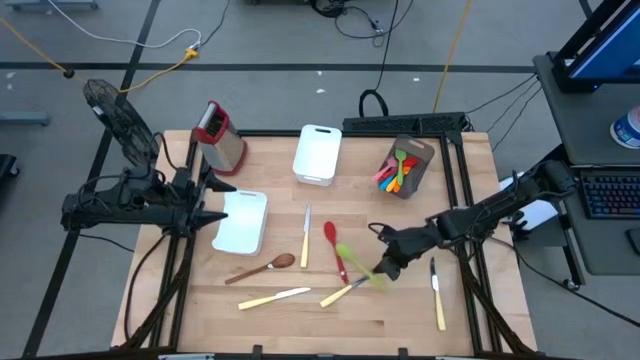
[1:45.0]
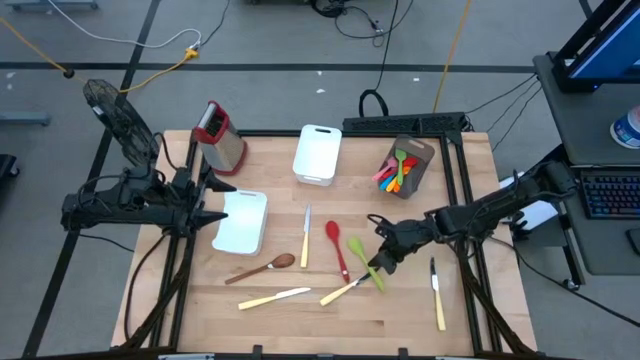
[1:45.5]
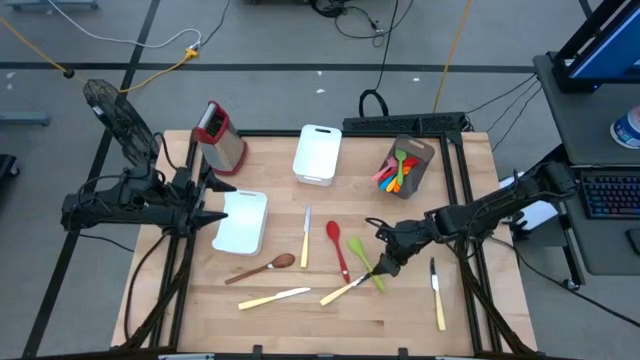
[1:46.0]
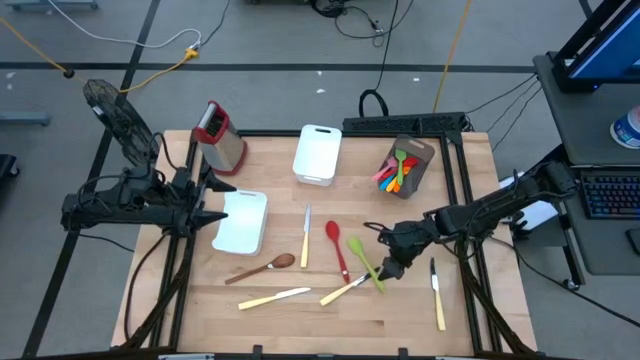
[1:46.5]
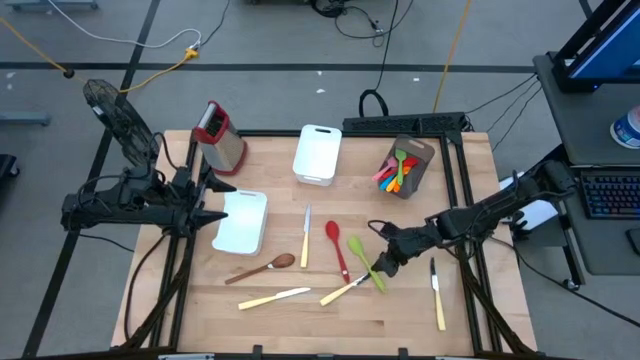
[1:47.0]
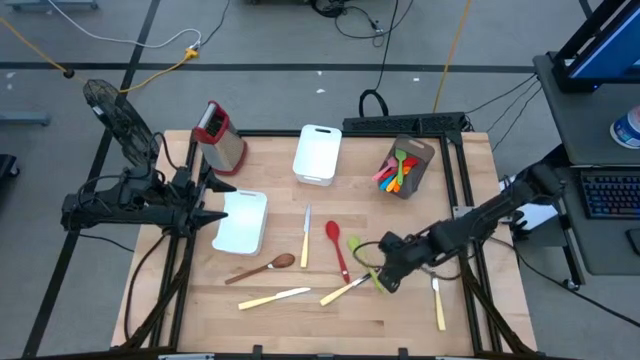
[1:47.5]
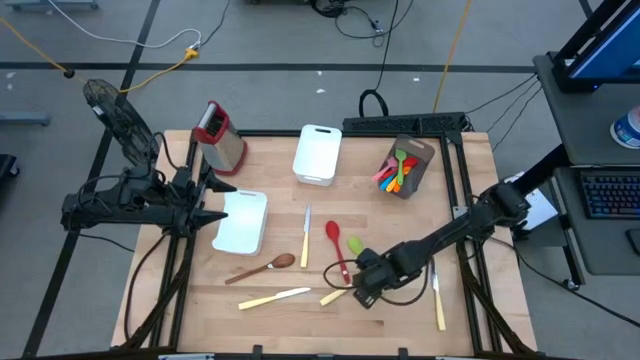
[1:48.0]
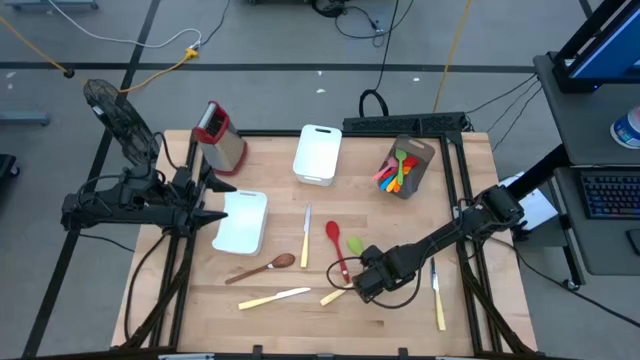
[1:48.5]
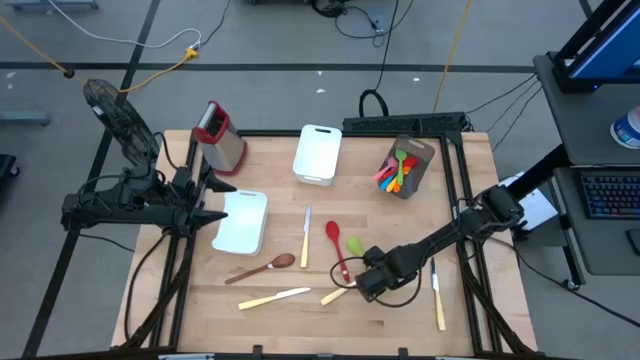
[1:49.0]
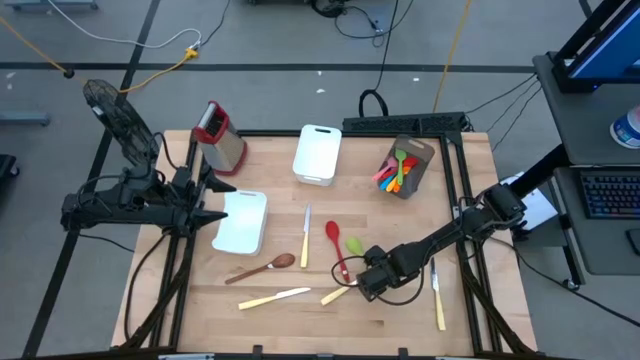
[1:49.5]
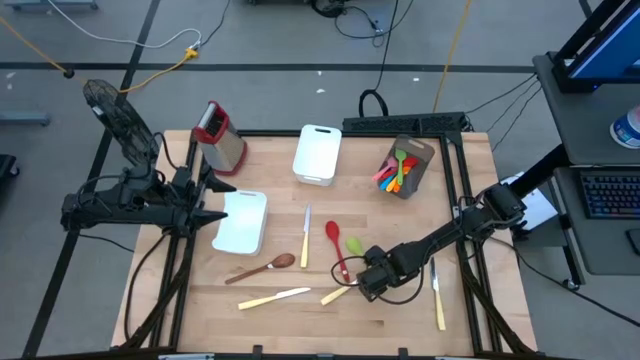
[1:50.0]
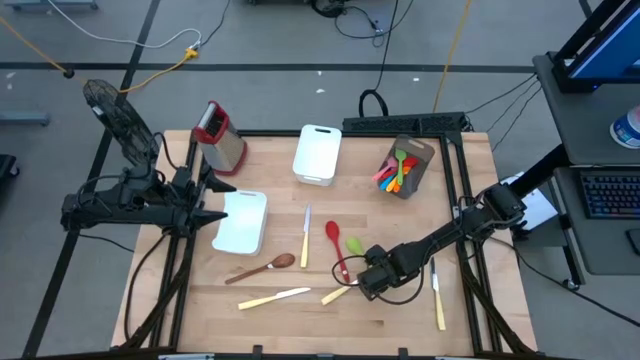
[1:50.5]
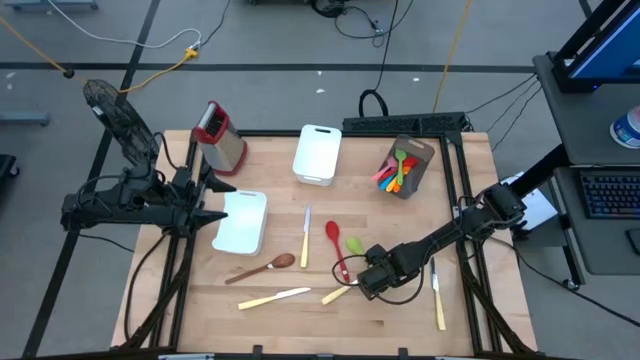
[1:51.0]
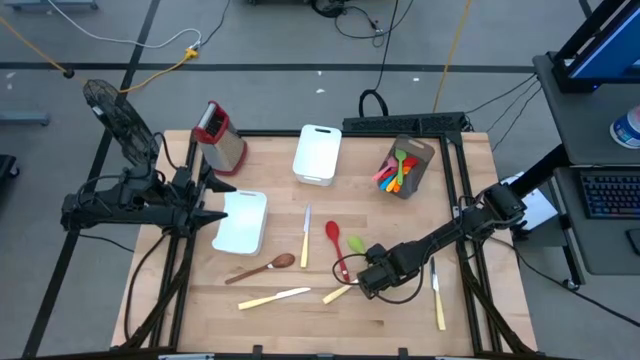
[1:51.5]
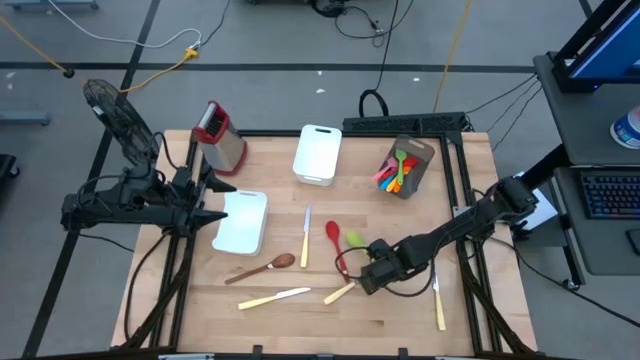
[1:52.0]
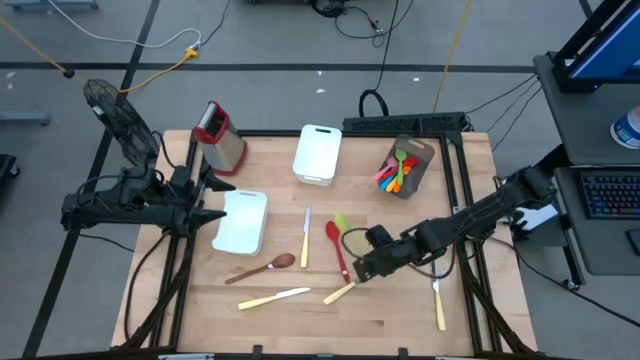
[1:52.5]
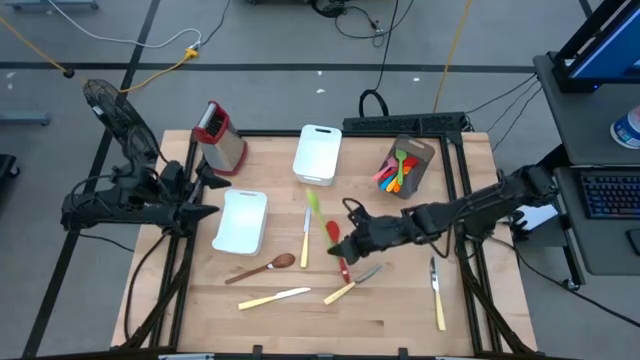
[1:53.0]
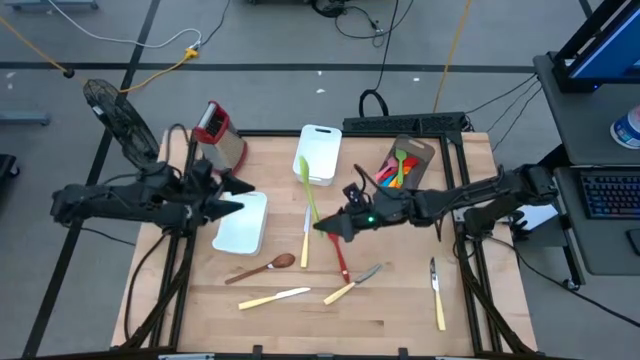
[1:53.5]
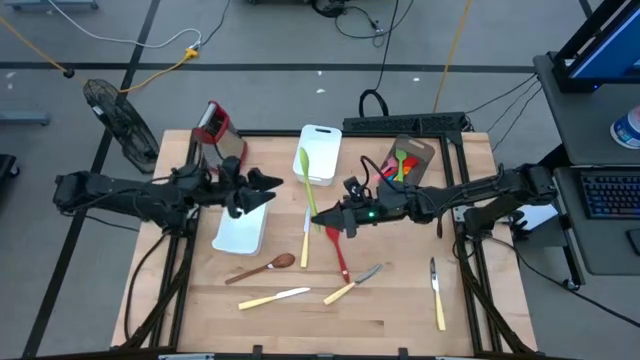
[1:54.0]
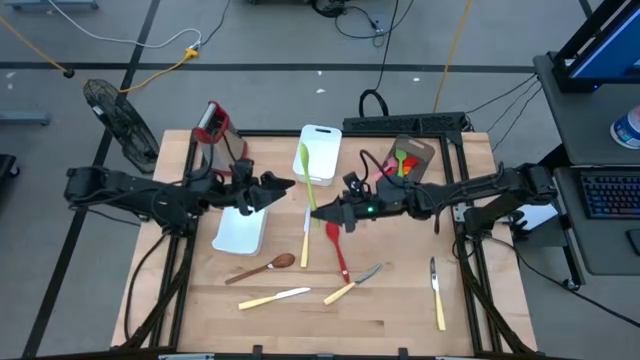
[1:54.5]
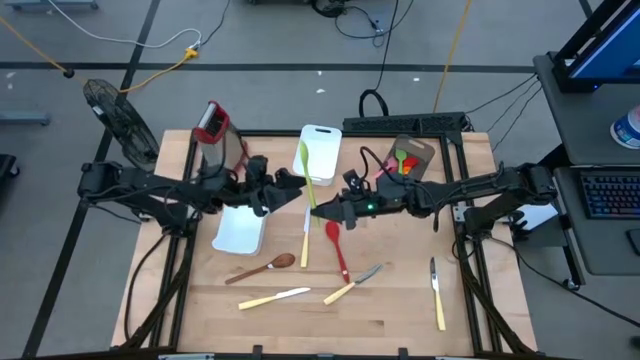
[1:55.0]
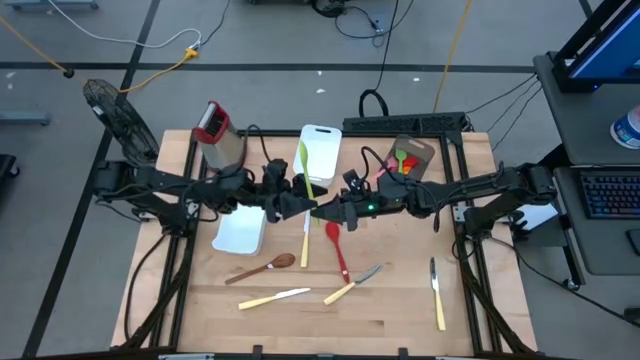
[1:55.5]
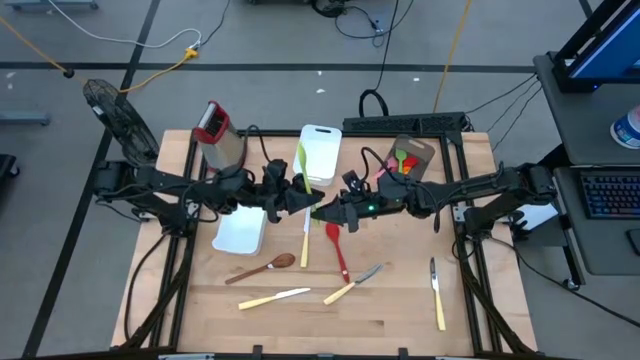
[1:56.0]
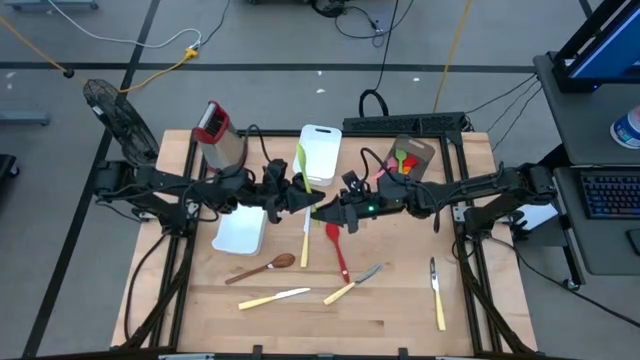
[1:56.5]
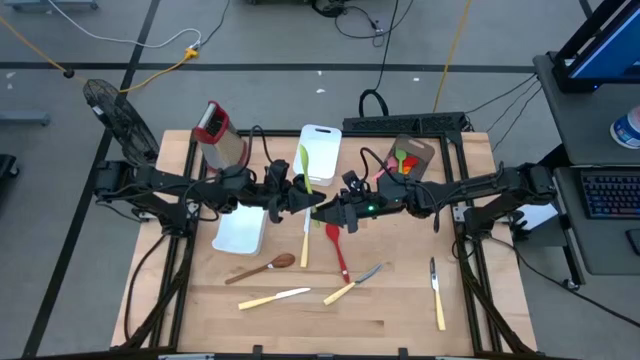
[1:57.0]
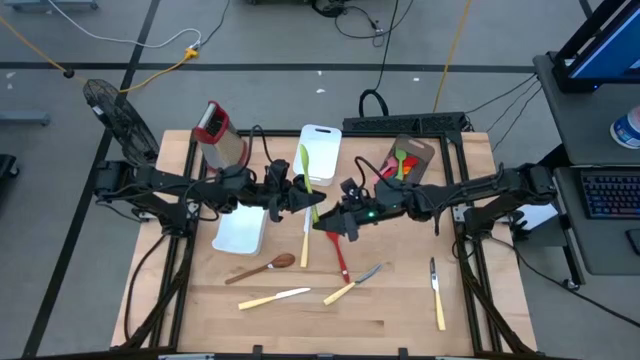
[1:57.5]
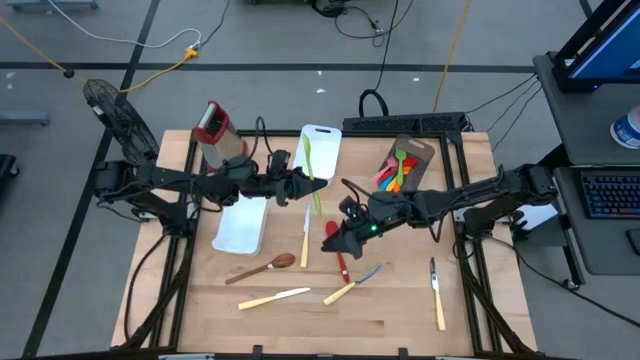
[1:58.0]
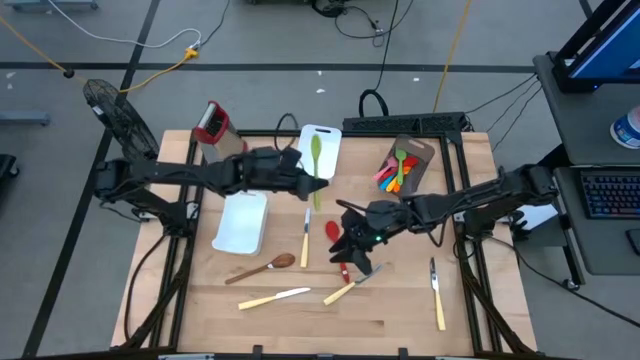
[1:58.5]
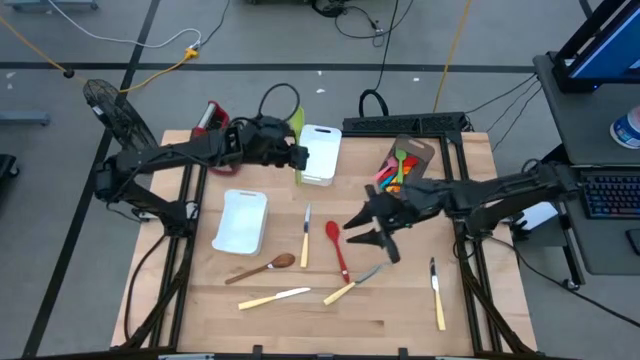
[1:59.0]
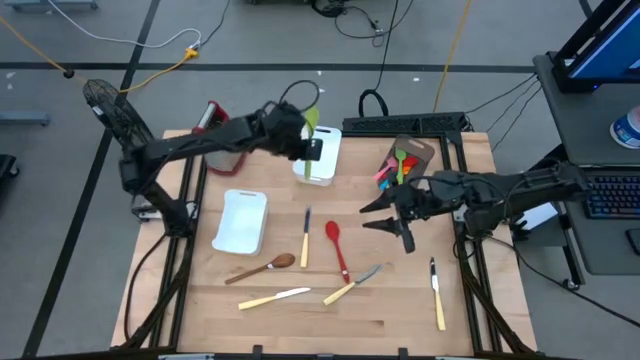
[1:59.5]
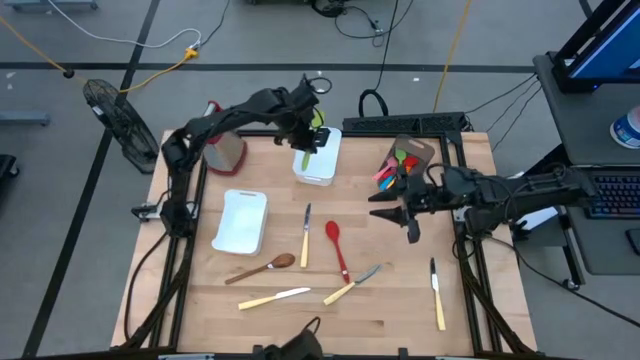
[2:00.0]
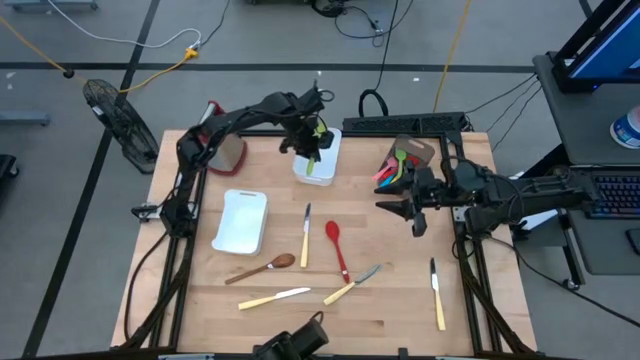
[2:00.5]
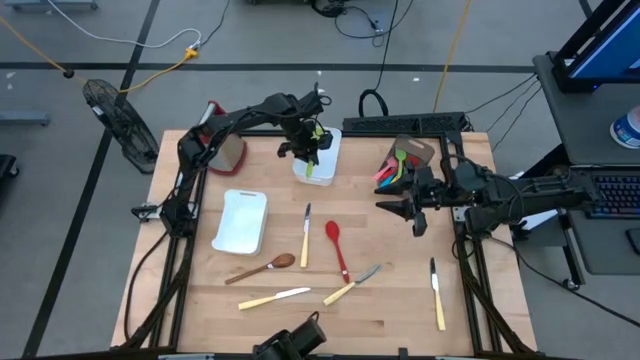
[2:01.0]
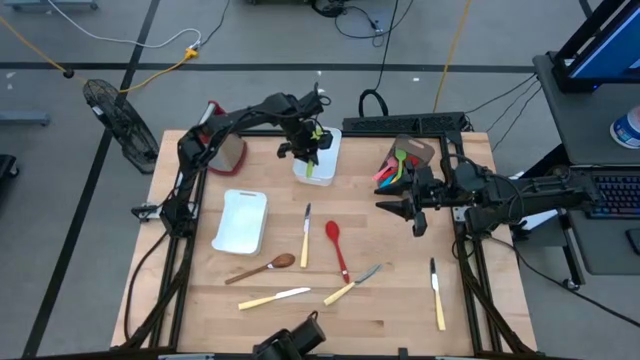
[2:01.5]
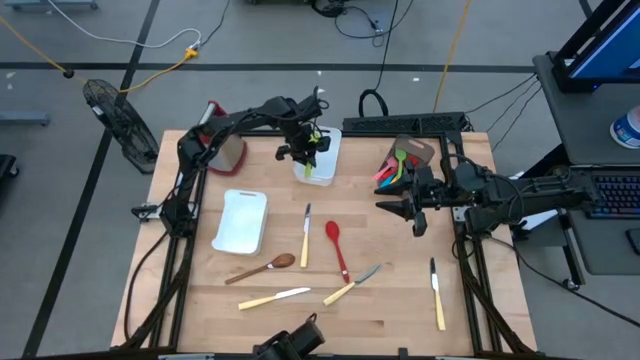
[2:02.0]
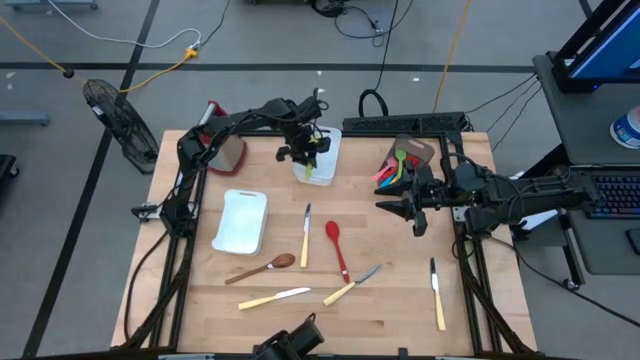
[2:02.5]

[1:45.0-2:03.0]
Task: Pick & Place Kitchen Items
Put the light green serving spoon into the top white bin

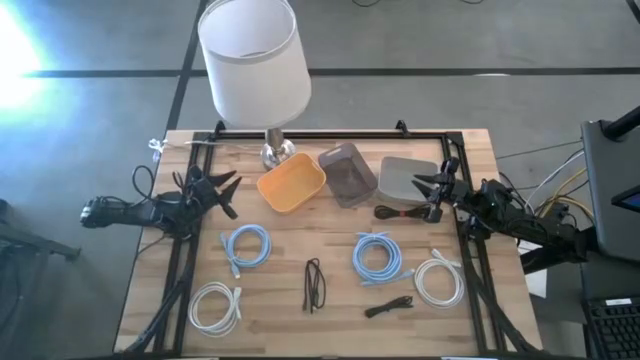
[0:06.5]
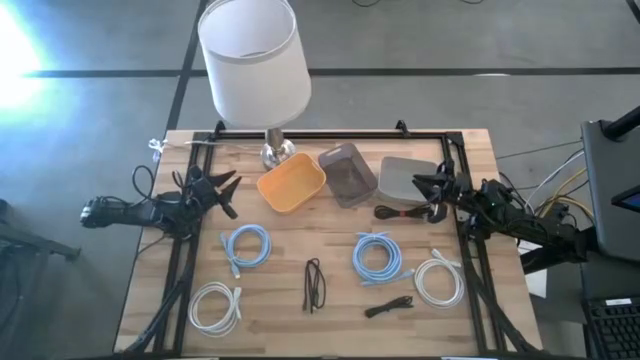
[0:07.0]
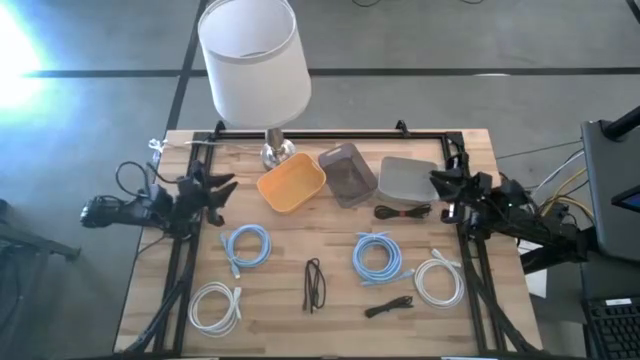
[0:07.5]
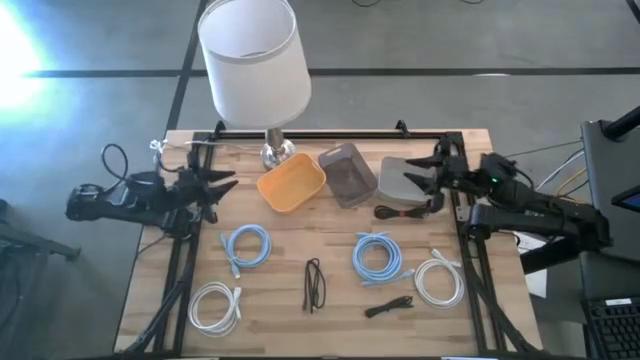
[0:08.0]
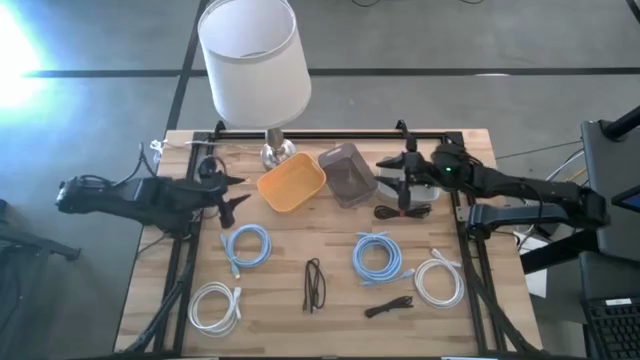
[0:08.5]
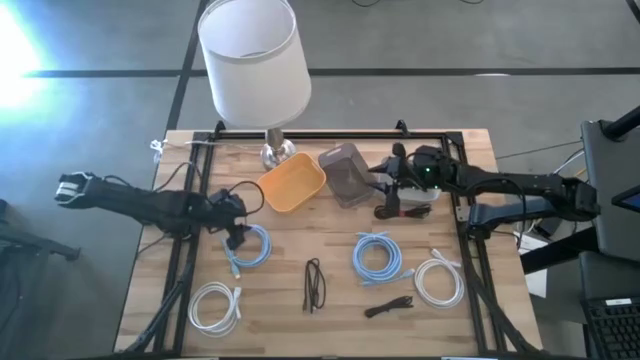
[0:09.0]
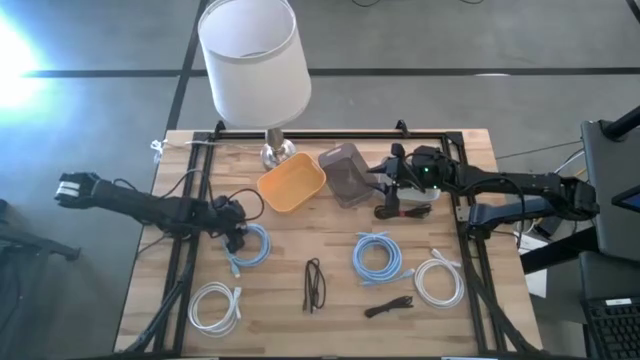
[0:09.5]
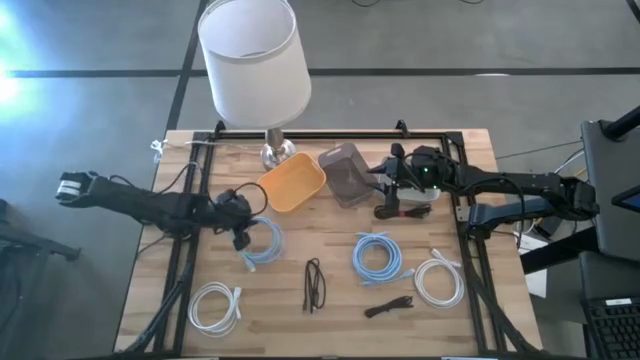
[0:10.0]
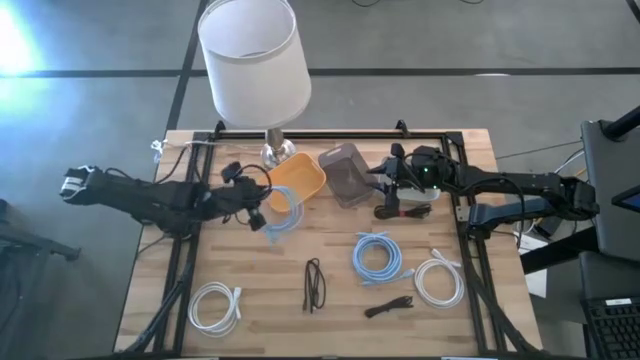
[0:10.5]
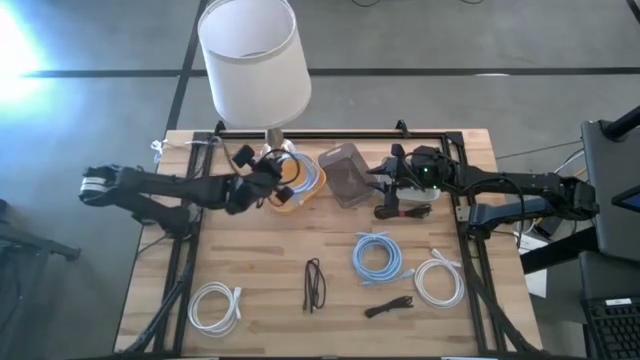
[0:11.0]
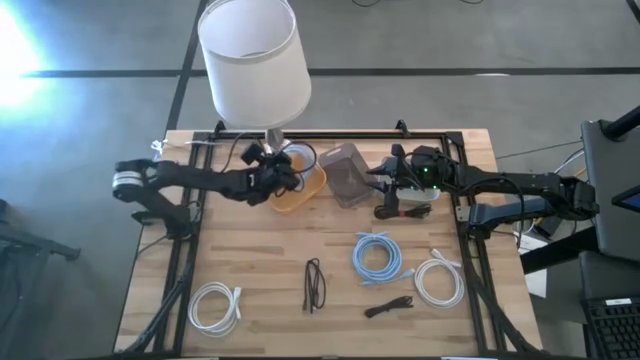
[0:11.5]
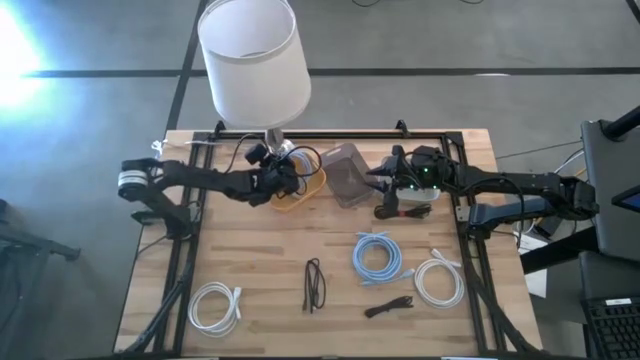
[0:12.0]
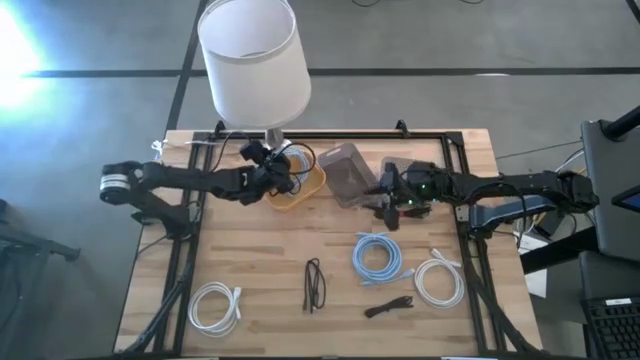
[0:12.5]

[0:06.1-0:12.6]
Task: Pick & Place USB Port
Put the left blue charger cable into the orange bin
